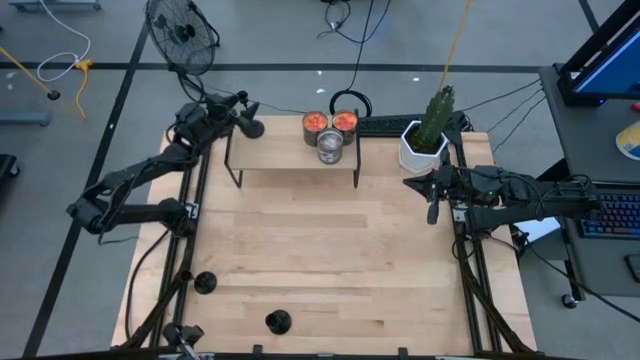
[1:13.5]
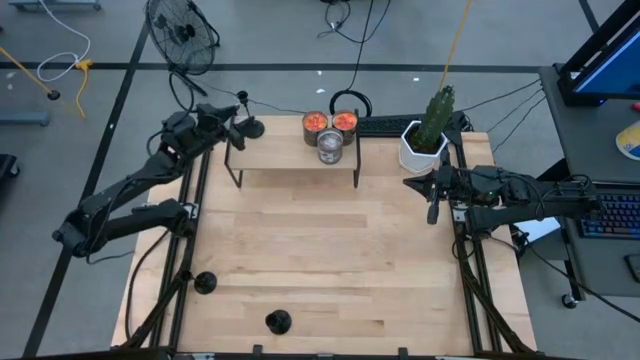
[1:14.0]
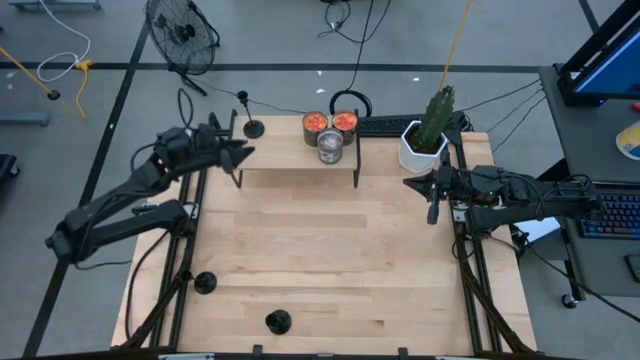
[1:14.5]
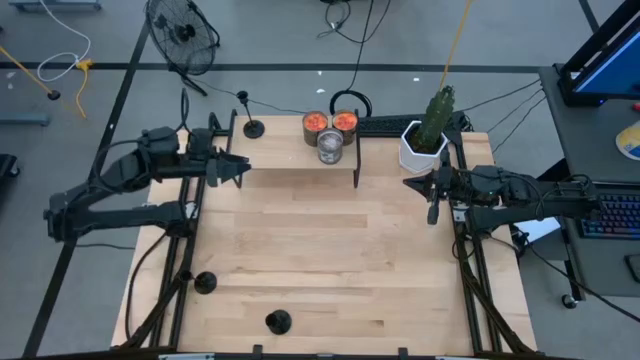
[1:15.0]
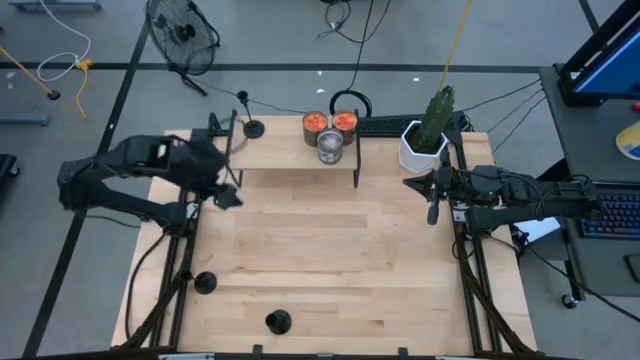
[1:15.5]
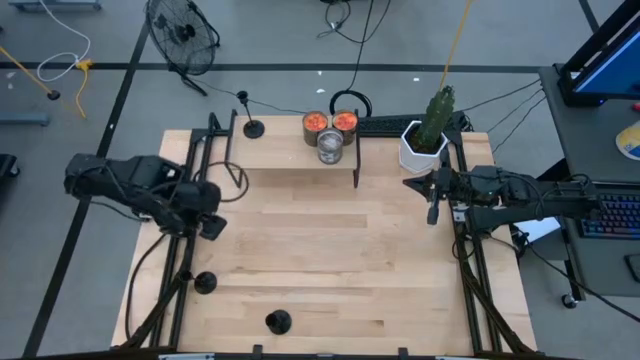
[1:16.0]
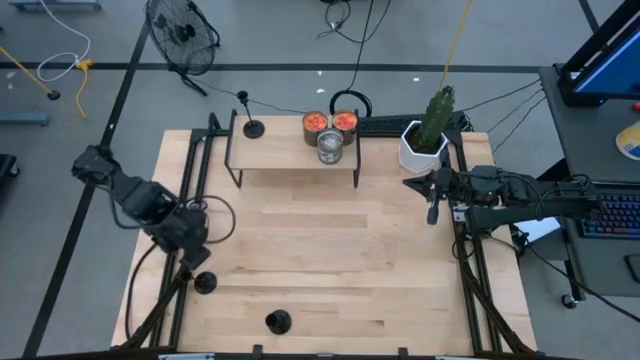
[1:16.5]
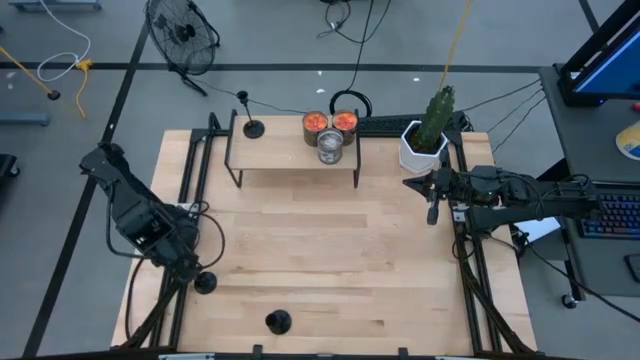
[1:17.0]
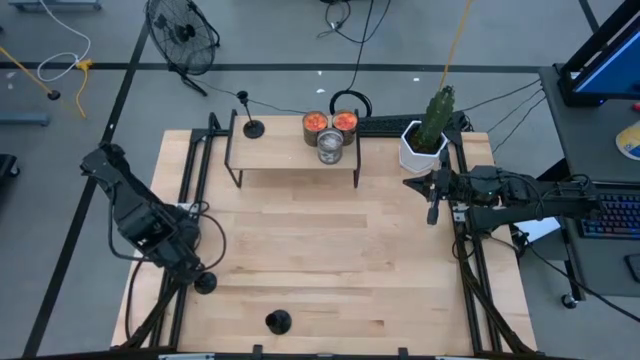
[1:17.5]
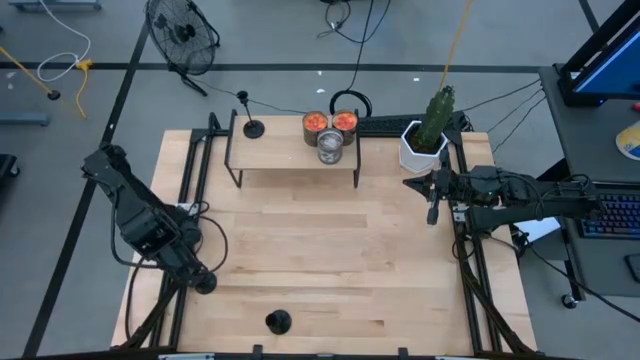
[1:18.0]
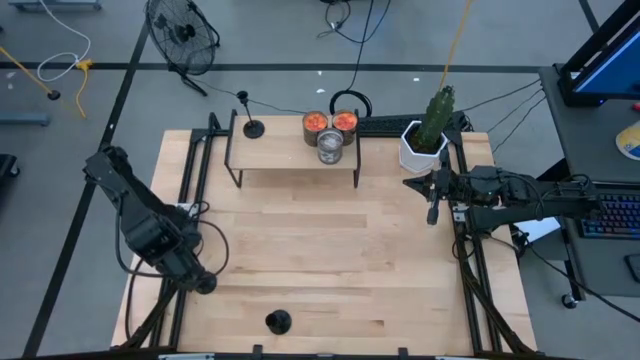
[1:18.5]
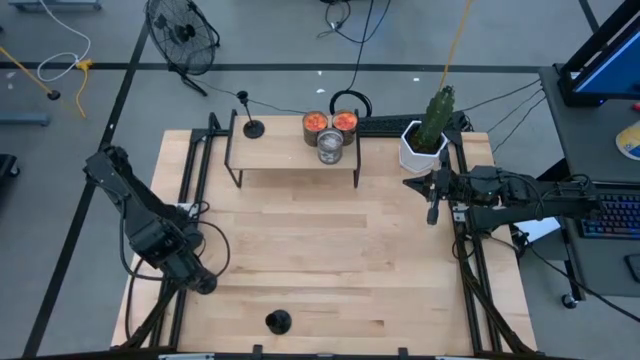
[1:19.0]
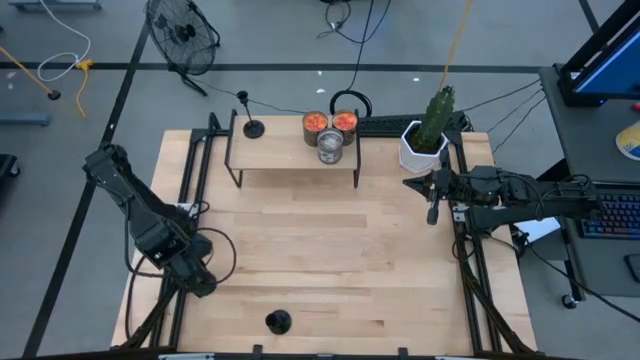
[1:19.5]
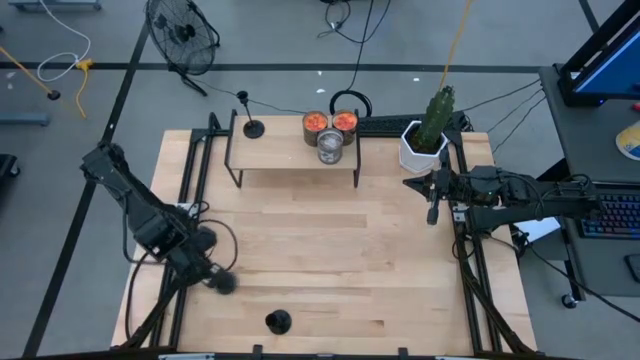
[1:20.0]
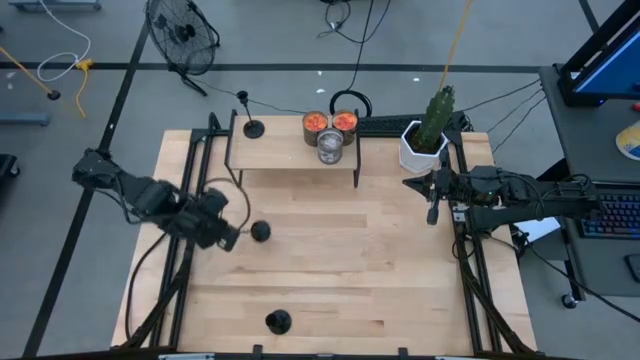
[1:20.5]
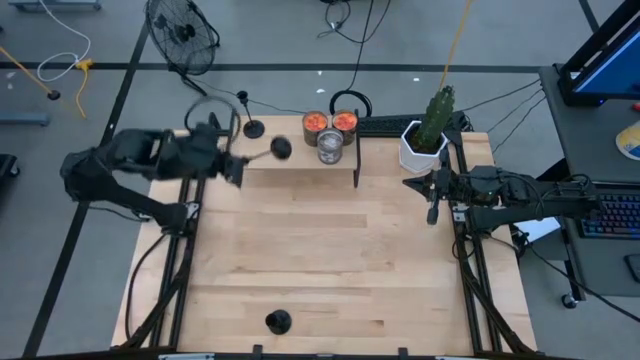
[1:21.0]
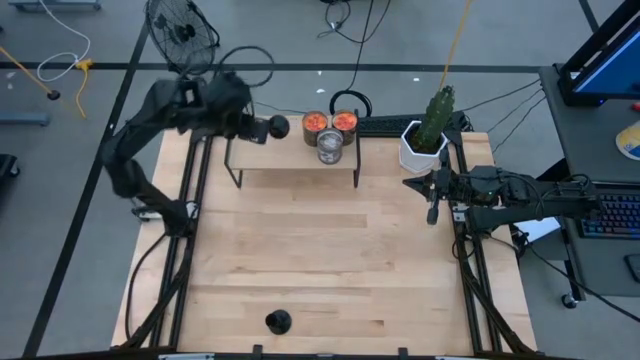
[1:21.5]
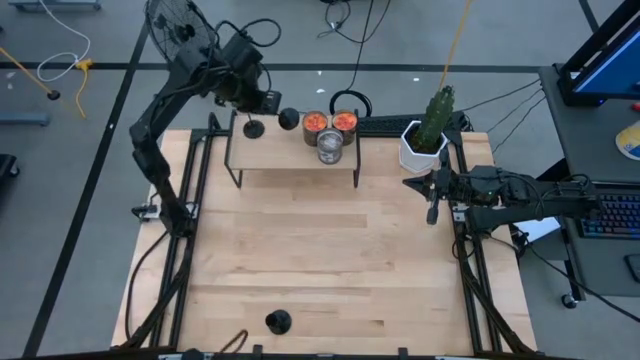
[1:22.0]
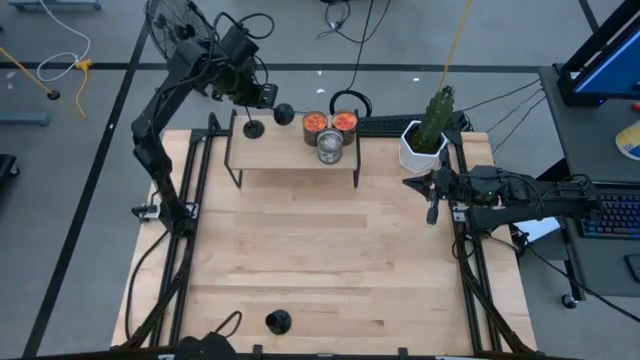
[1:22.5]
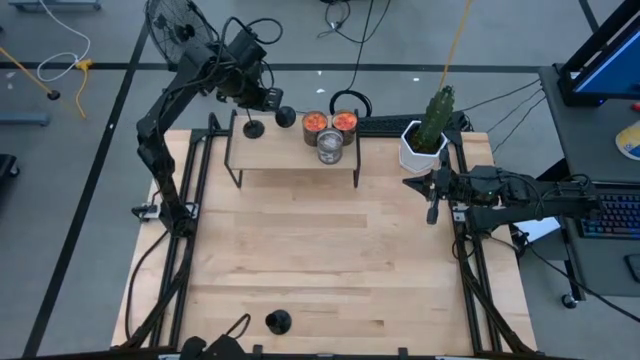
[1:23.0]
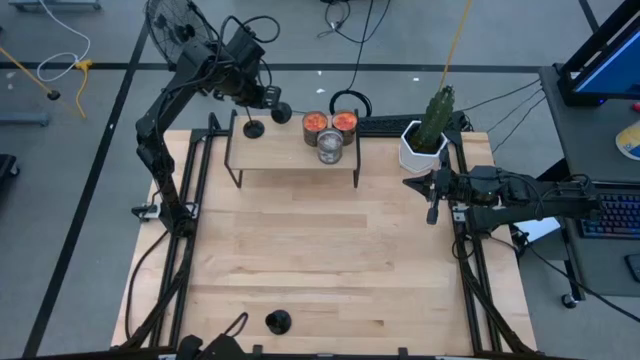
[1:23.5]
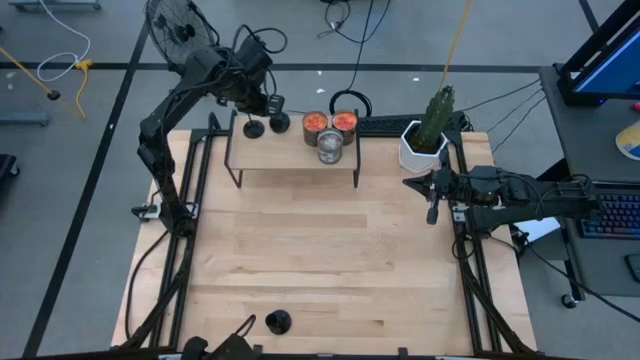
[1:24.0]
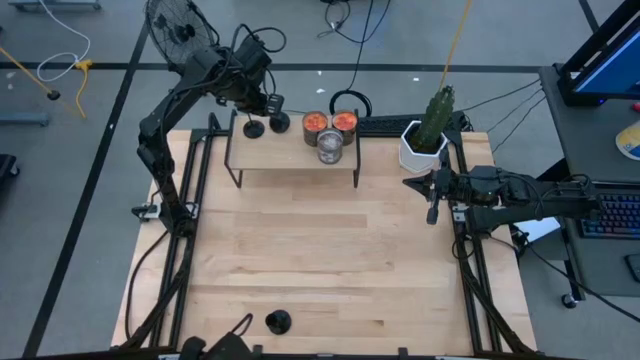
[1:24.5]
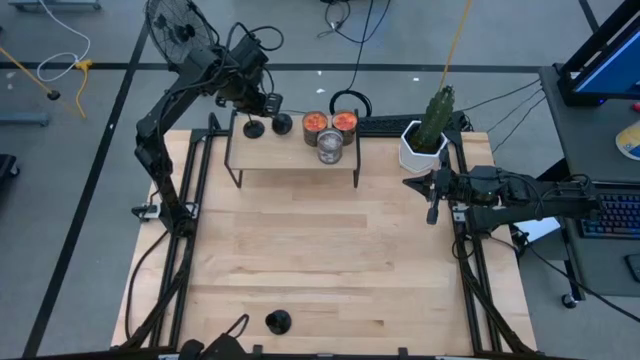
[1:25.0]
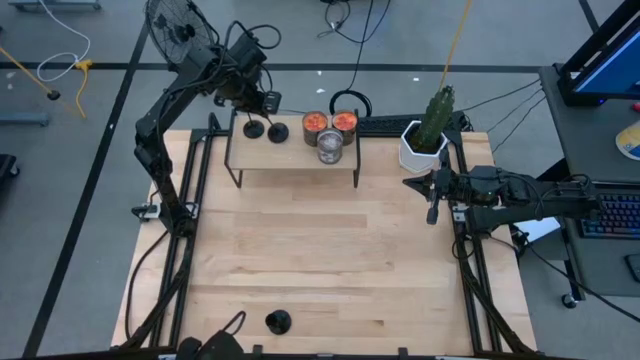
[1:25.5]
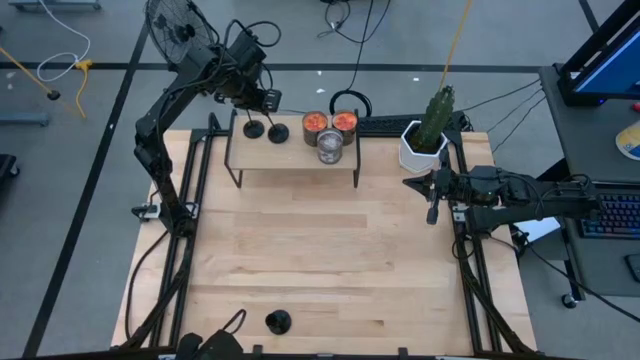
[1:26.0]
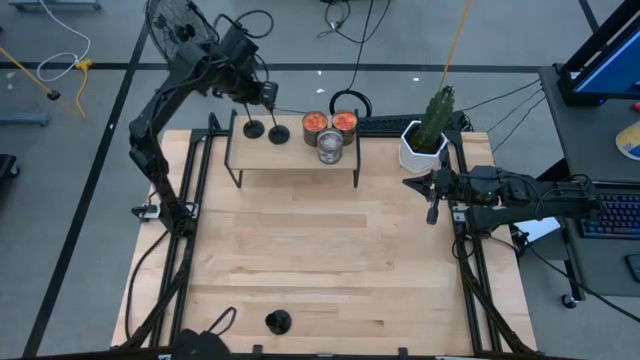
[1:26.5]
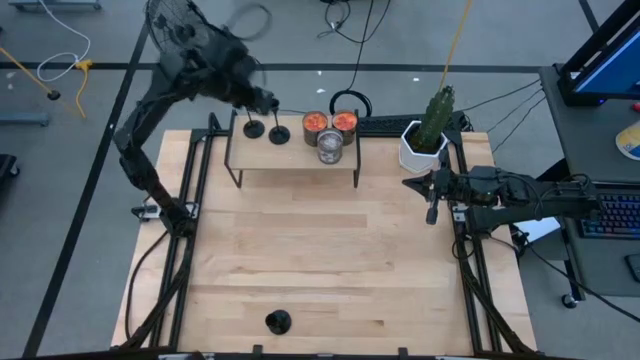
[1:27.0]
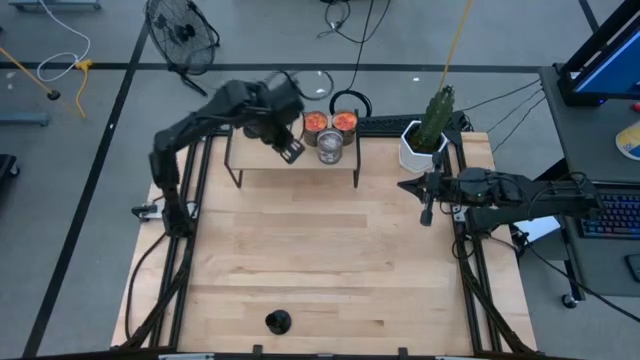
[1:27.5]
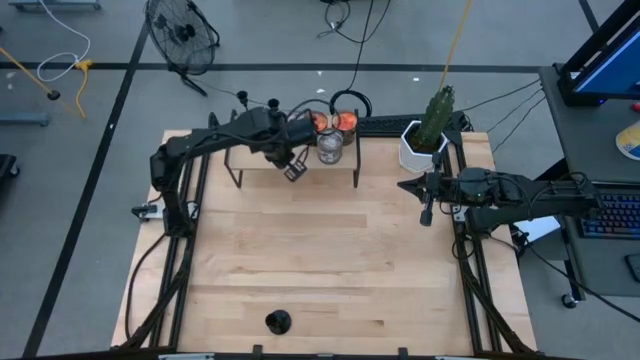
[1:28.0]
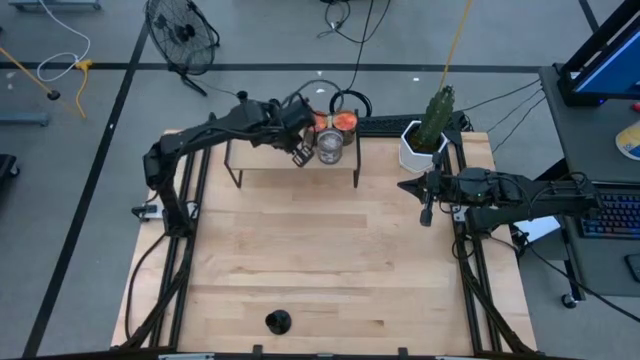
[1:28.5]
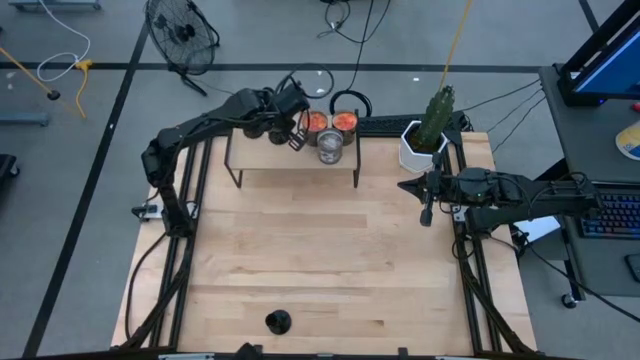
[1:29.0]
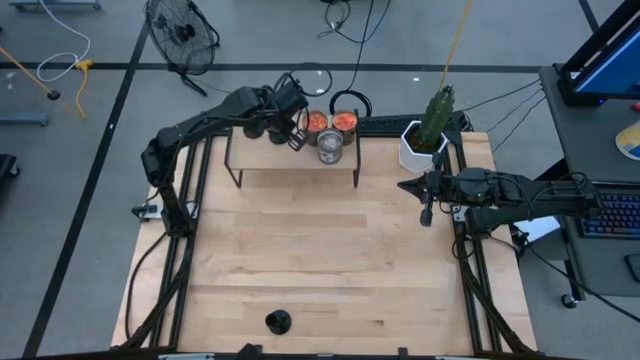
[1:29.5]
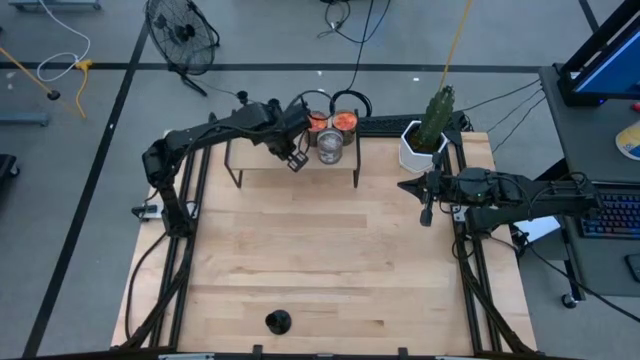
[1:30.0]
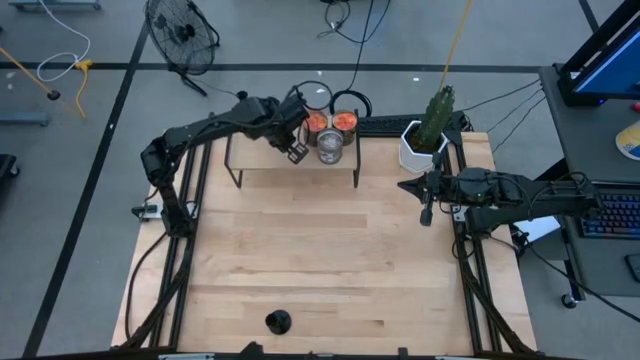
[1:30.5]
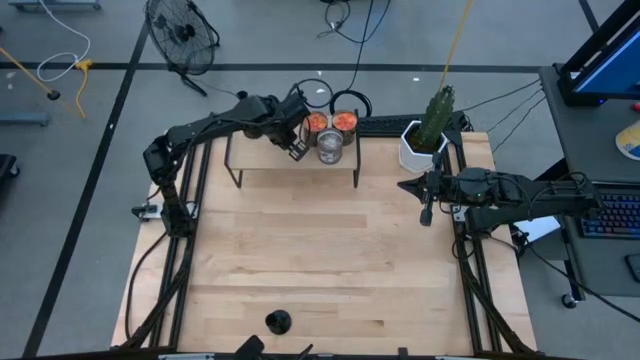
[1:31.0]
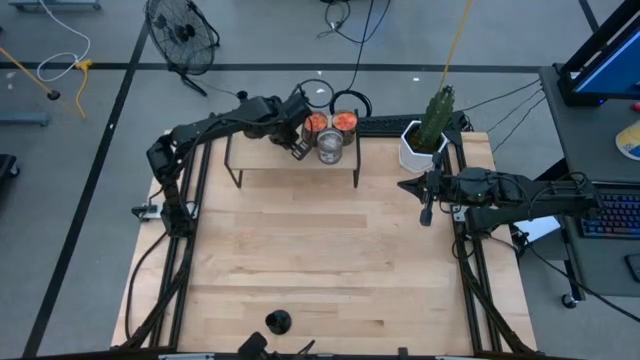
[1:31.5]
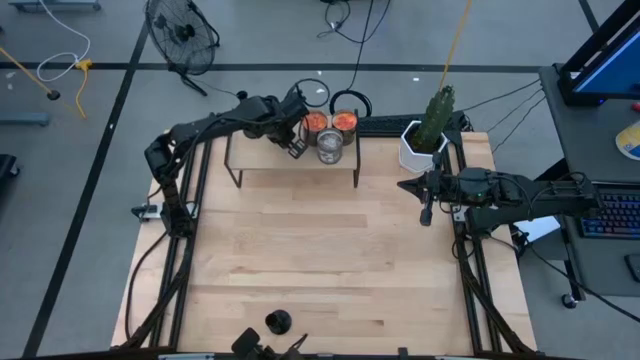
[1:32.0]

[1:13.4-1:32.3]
Task: Pick & Place candle stick holders
Put the top black candle holder on the shelf

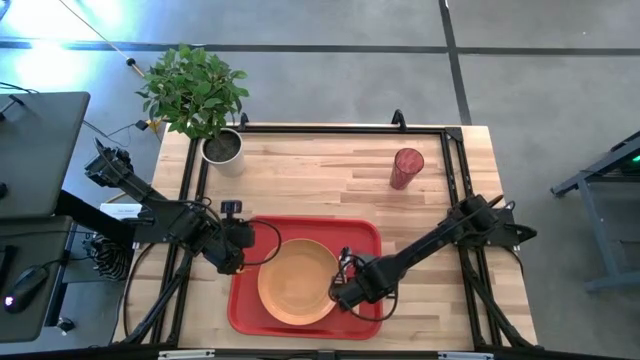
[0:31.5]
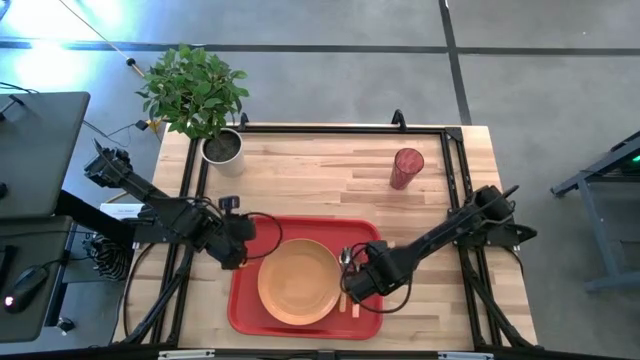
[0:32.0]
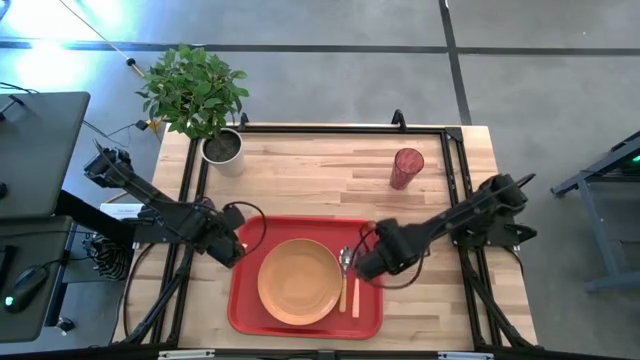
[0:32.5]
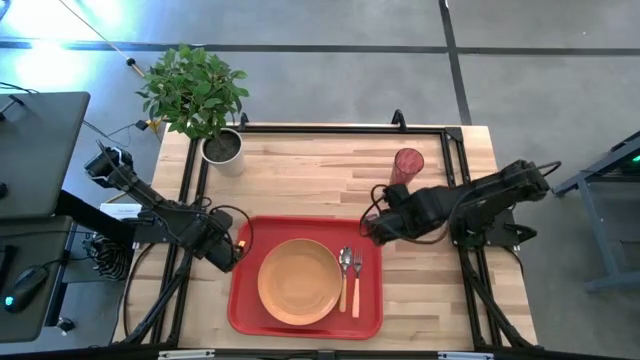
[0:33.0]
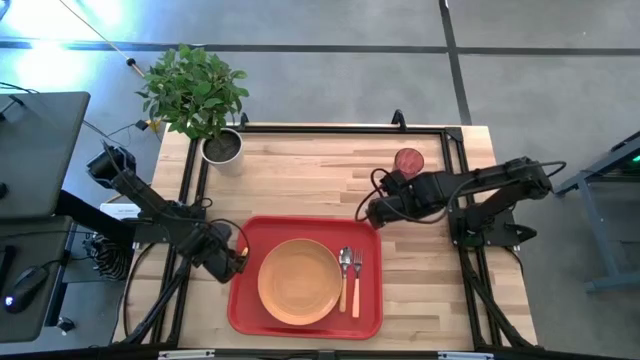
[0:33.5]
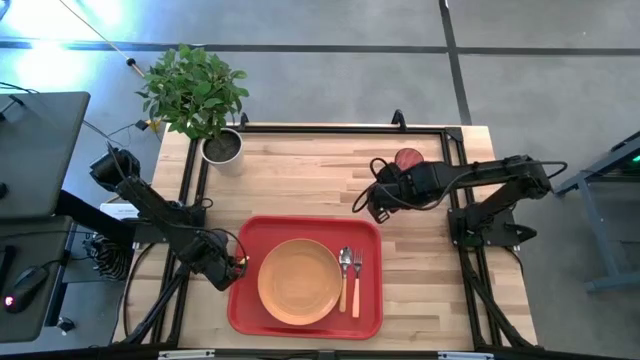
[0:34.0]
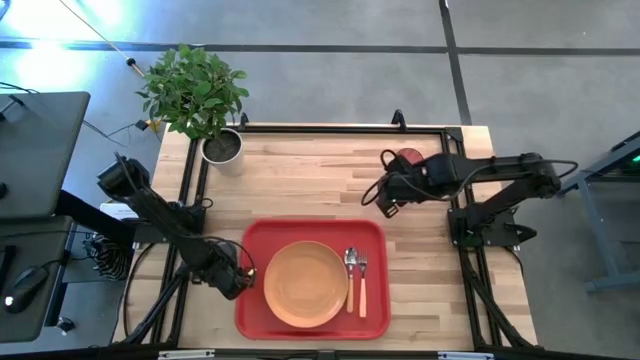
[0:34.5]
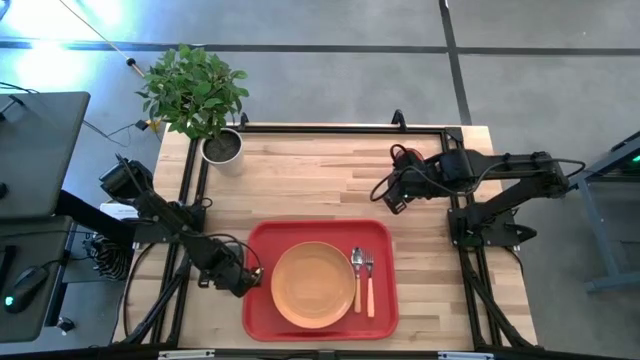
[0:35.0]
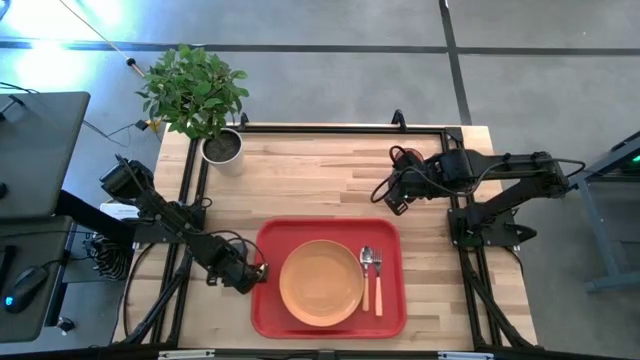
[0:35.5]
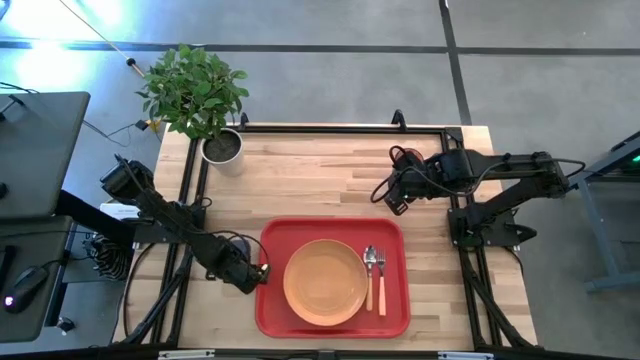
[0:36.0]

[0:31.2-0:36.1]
Task: Pick and place plate/cup/fork/spoon on tray
Move the orange tray to the center of the table
